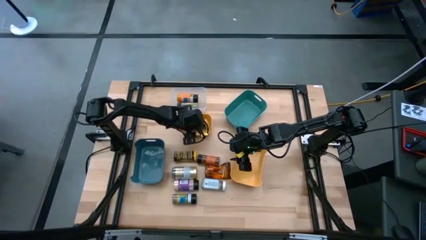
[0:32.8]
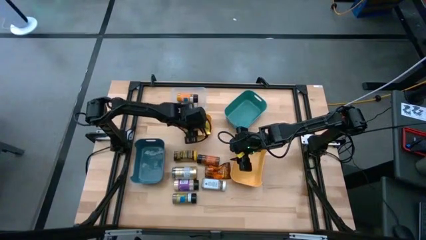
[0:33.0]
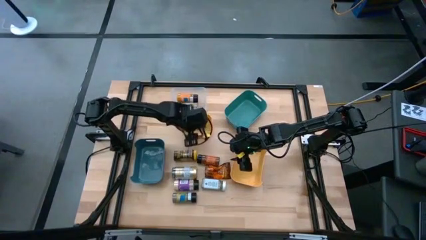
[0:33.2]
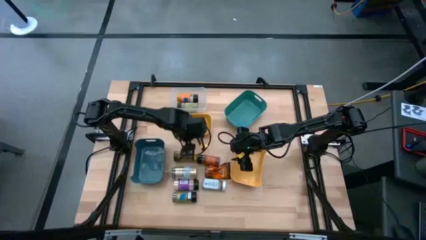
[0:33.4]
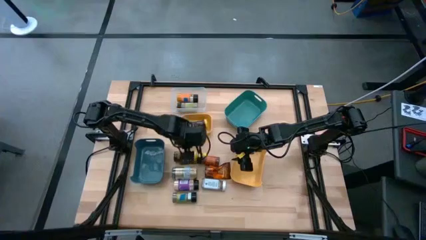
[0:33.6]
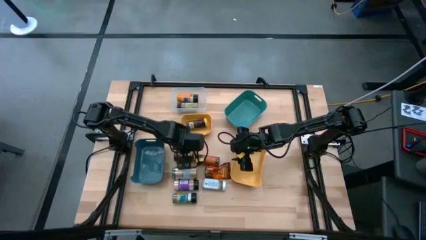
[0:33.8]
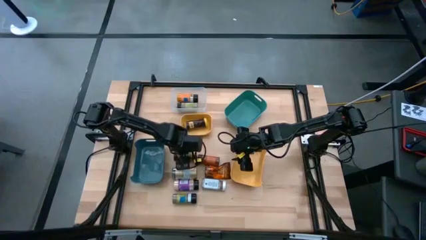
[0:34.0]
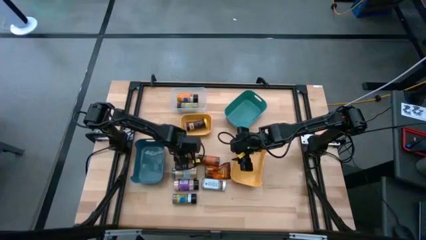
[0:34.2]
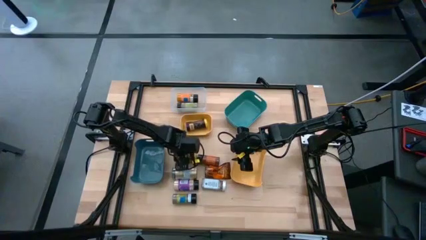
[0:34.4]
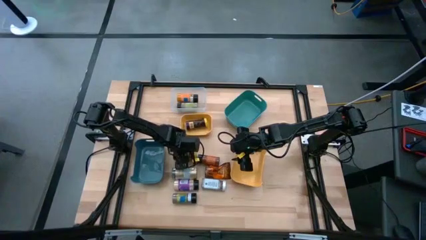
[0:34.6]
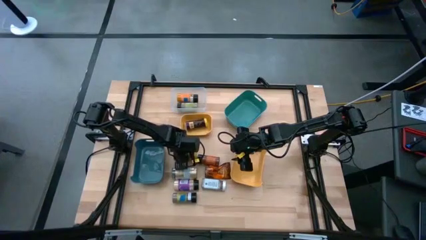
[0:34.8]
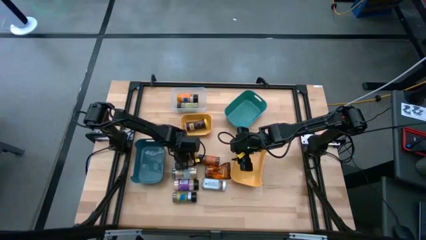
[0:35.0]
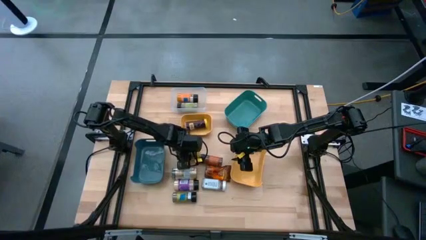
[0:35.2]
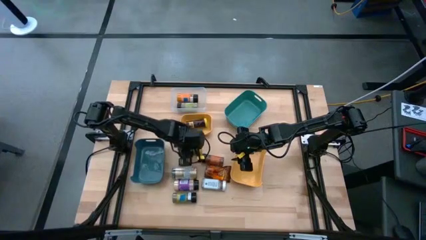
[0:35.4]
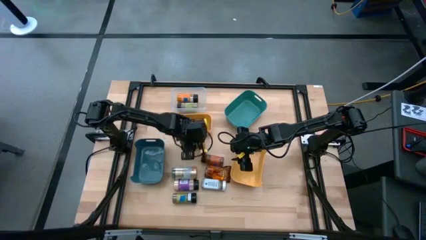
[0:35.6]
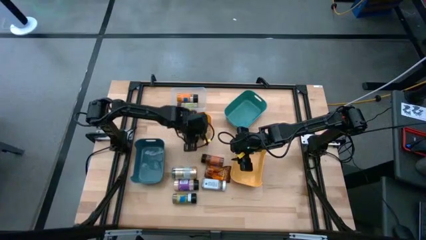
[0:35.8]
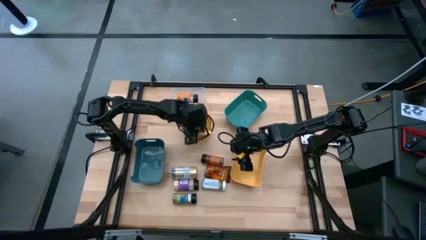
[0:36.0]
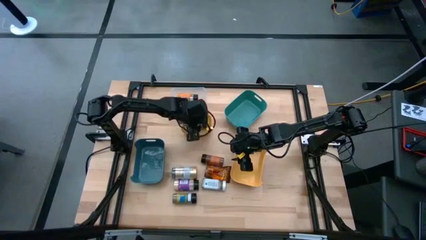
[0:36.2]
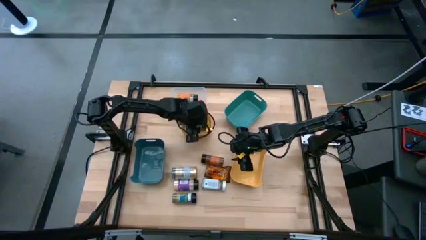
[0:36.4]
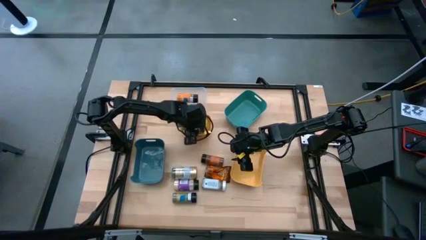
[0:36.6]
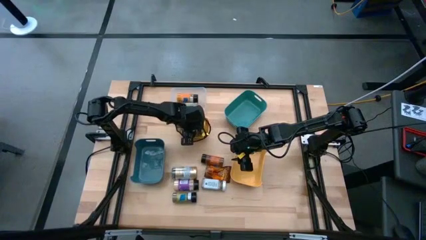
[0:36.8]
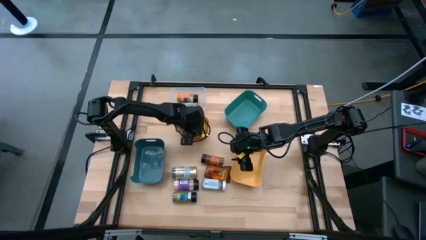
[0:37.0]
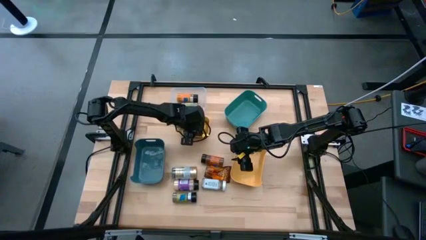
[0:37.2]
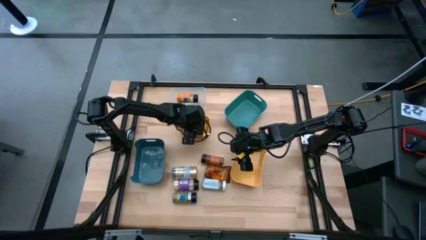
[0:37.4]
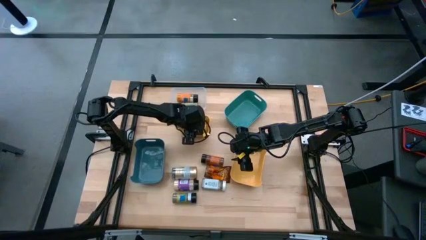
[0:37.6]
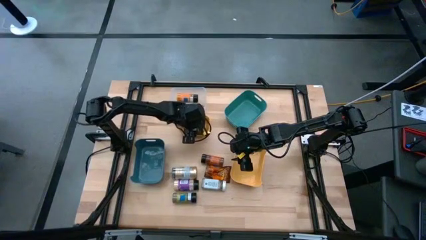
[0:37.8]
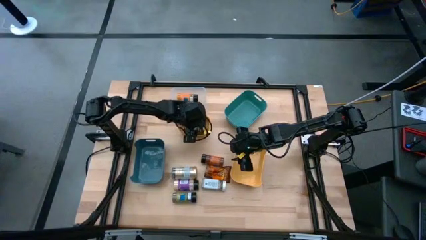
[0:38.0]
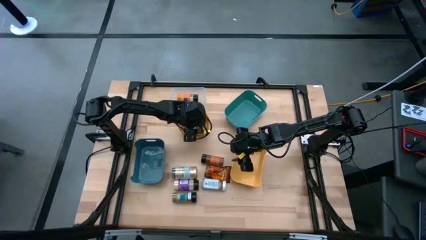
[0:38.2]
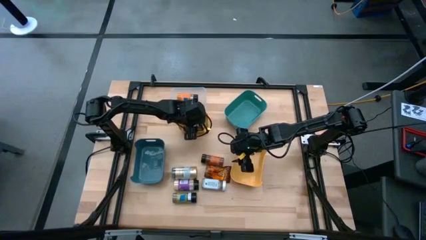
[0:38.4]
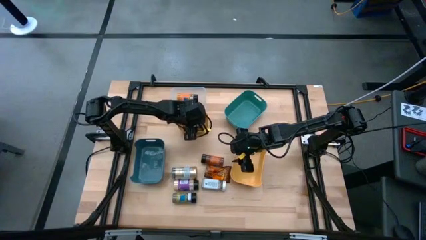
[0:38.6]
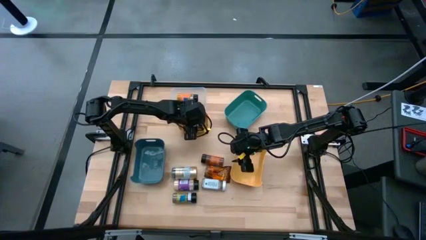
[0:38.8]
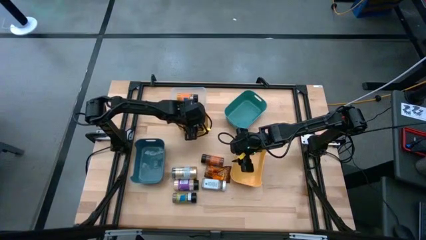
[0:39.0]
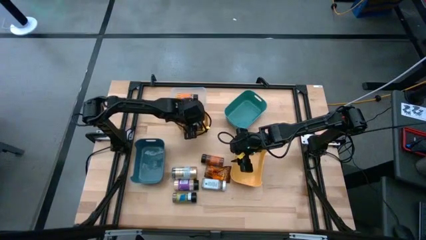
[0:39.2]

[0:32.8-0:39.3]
Task: Sort spices by type
Put the yellow seasoning can into the top yellow bin

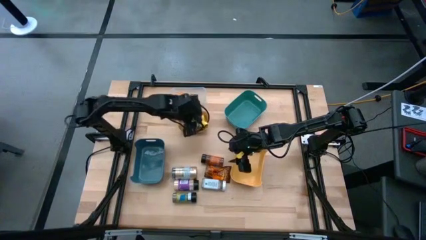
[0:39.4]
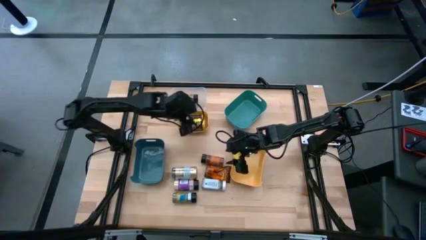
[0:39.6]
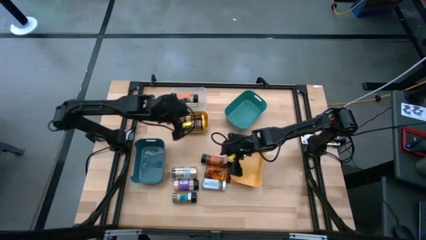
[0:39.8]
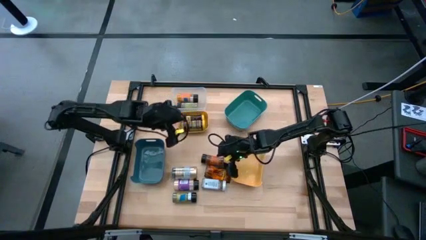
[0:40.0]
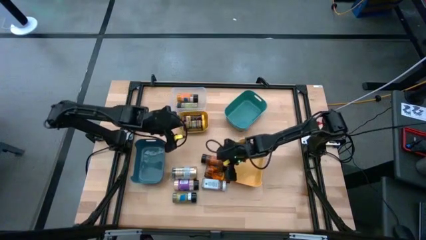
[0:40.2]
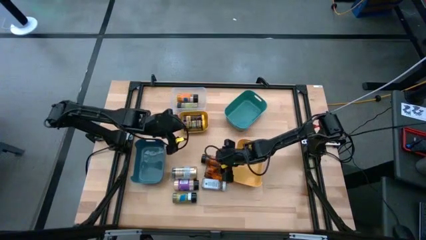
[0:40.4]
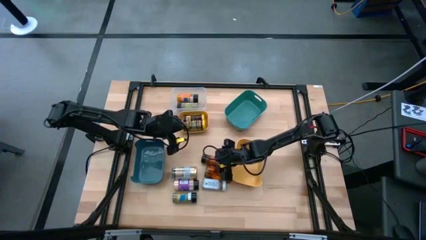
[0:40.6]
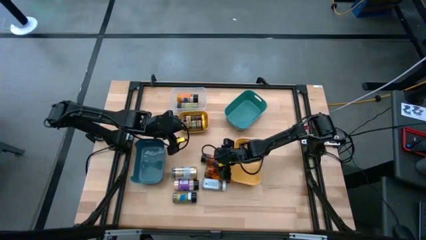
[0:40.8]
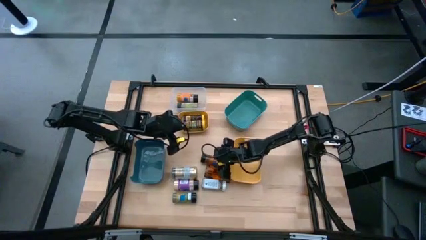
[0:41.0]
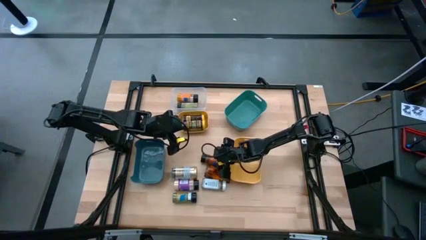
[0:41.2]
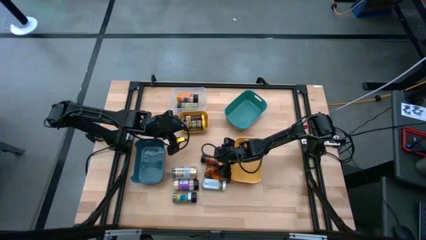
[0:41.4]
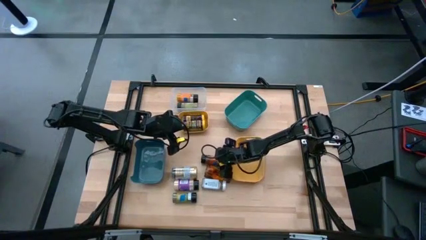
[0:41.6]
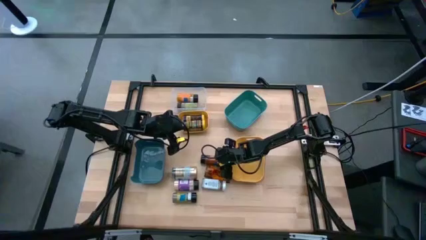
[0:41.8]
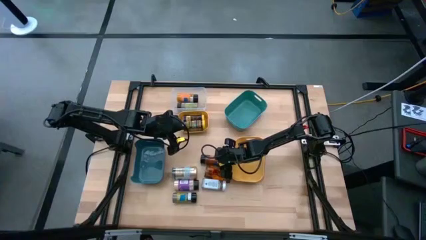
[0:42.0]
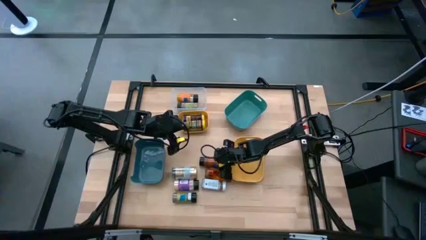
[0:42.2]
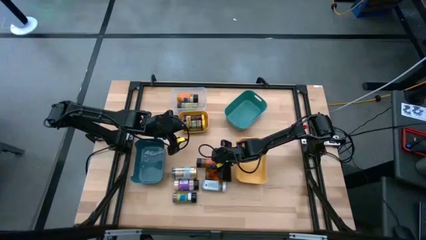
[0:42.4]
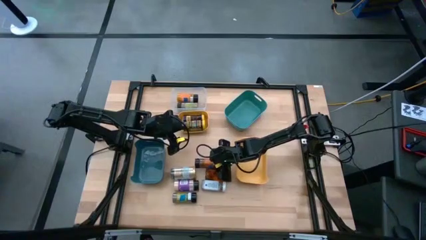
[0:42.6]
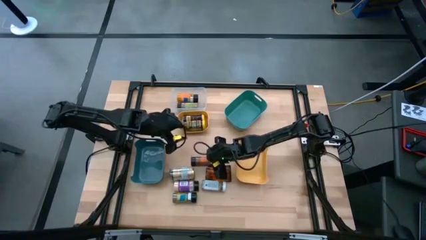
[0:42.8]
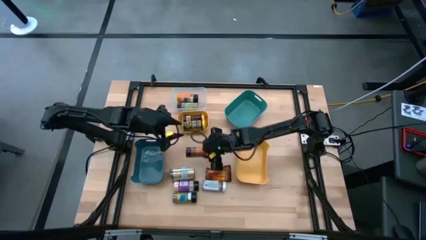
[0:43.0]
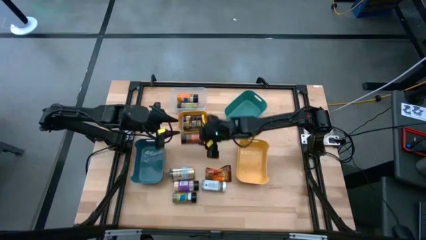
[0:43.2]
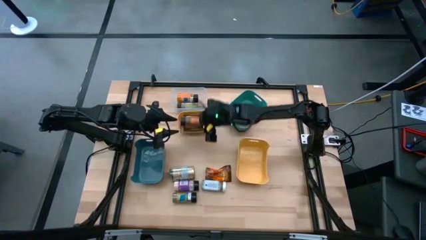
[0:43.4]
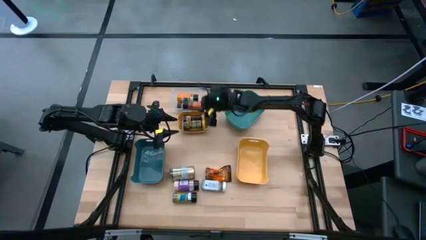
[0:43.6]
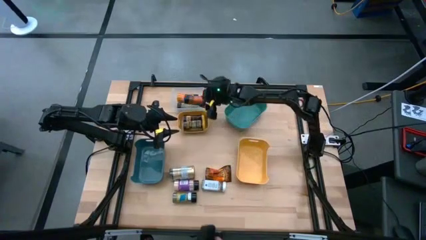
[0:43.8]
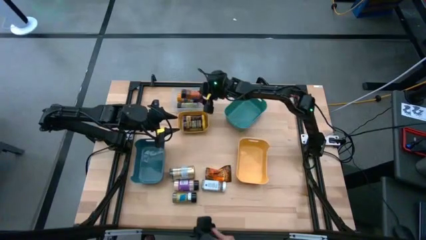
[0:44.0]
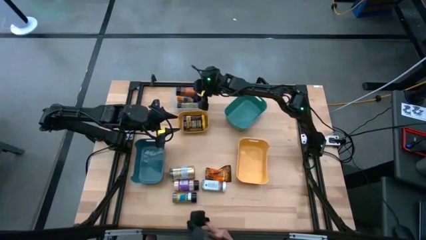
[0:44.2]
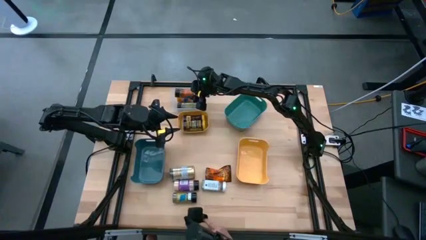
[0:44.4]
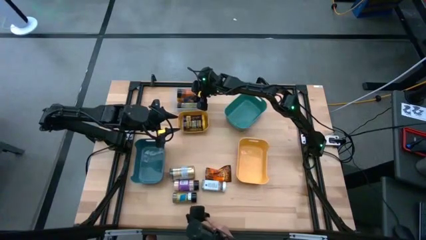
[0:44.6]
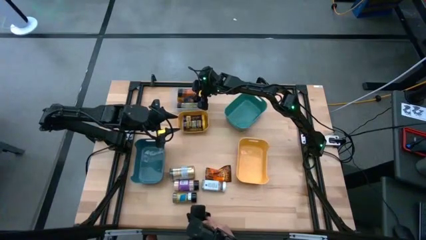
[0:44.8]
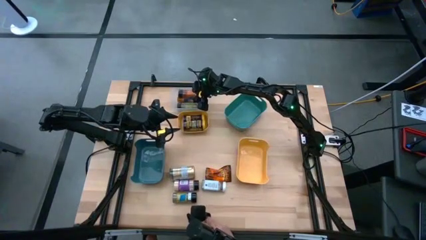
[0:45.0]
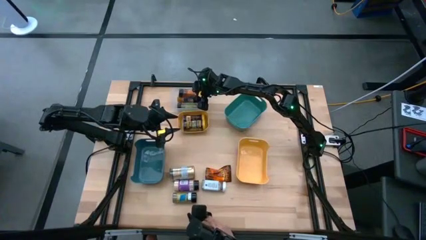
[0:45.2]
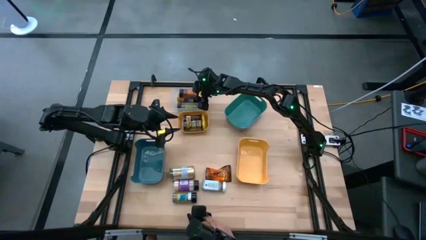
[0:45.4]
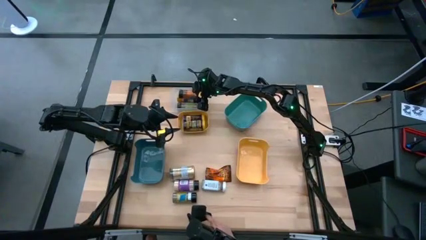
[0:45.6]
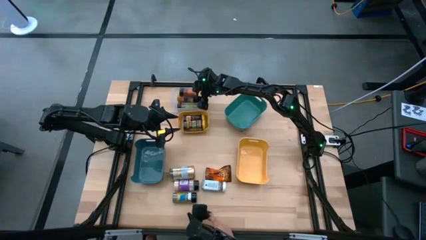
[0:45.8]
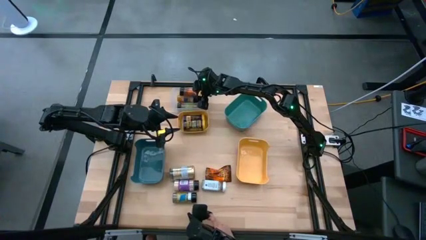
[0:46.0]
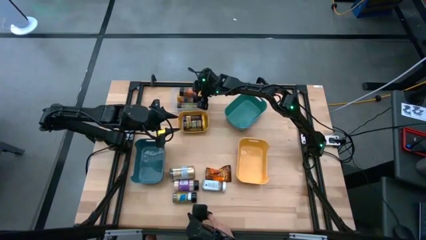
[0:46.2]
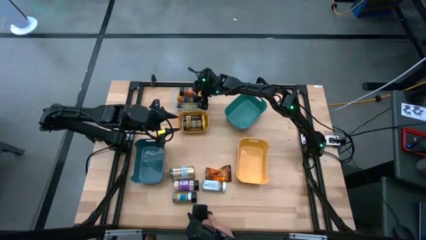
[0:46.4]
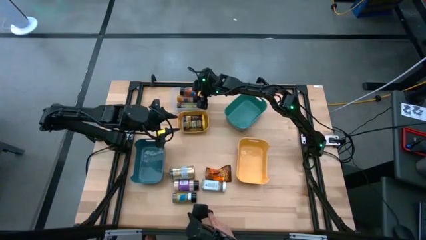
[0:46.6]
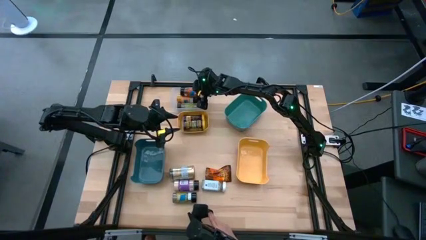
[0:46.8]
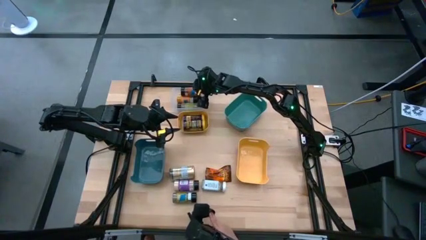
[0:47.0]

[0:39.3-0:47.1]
Put the black seasoning bottle into the transparent bin

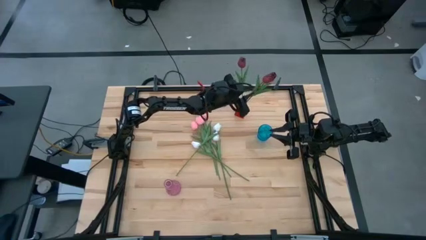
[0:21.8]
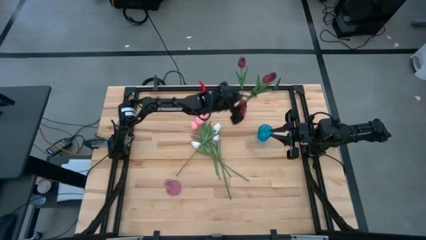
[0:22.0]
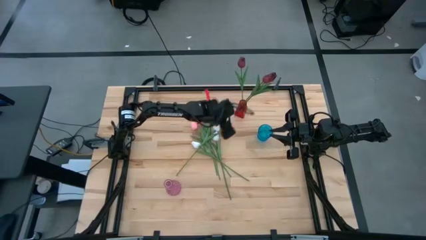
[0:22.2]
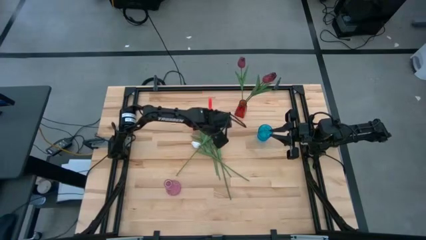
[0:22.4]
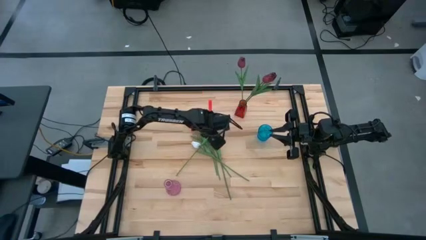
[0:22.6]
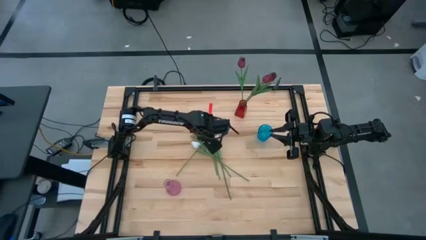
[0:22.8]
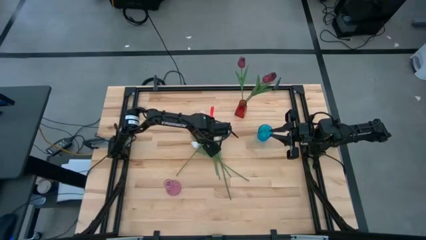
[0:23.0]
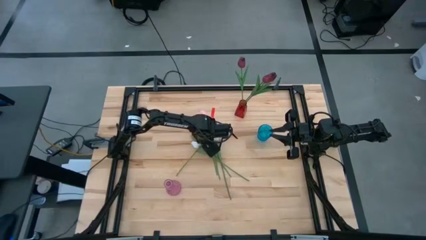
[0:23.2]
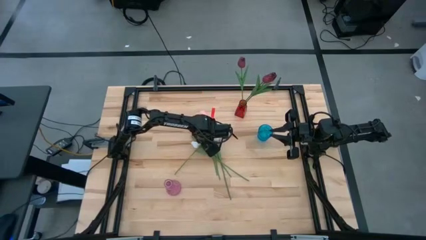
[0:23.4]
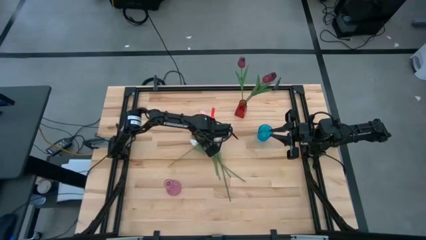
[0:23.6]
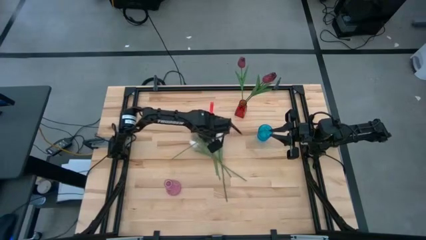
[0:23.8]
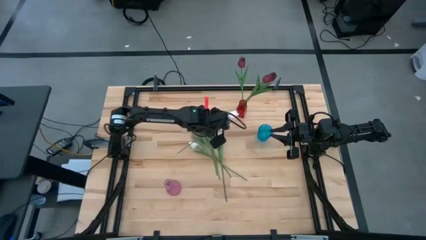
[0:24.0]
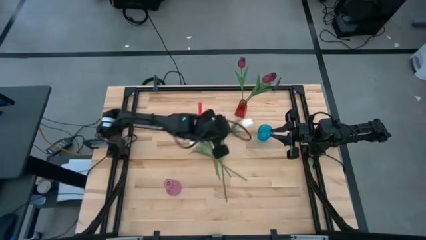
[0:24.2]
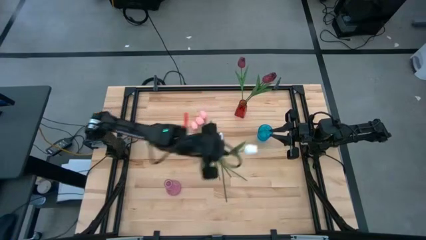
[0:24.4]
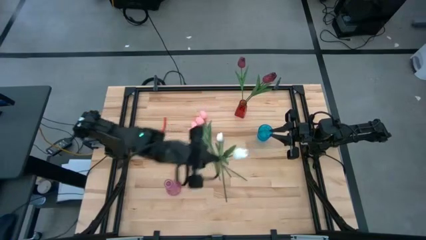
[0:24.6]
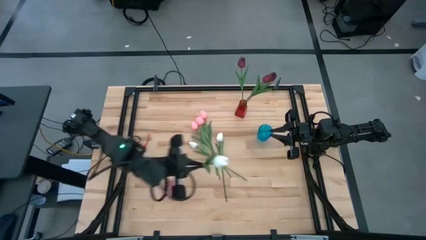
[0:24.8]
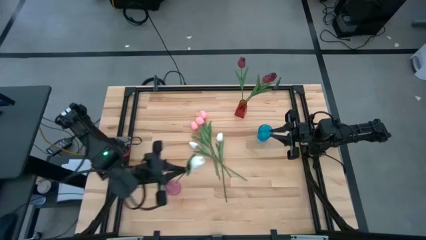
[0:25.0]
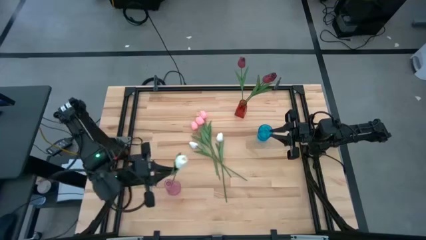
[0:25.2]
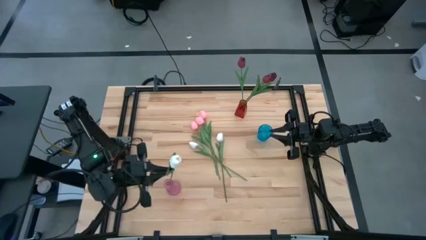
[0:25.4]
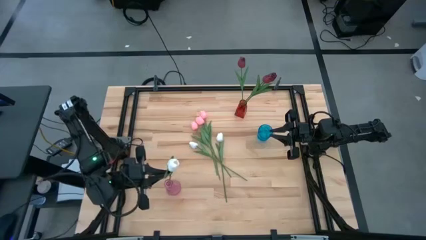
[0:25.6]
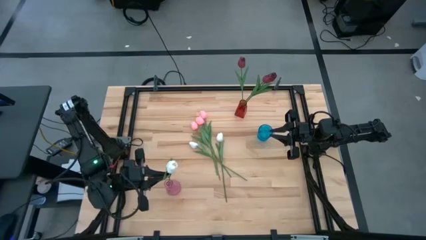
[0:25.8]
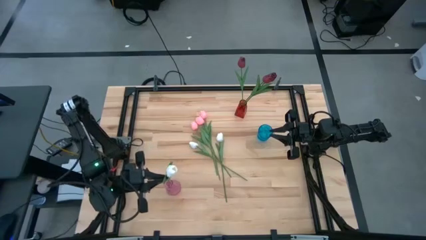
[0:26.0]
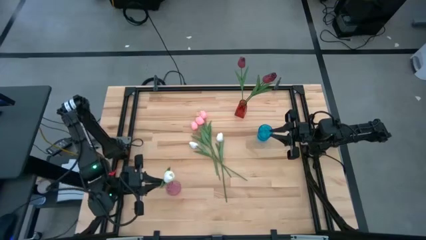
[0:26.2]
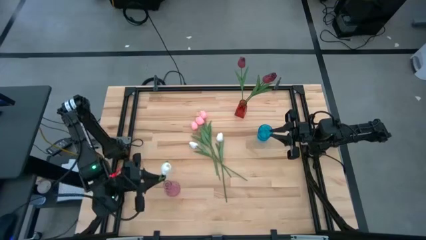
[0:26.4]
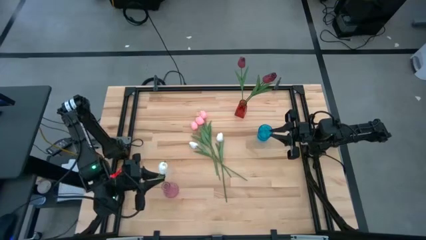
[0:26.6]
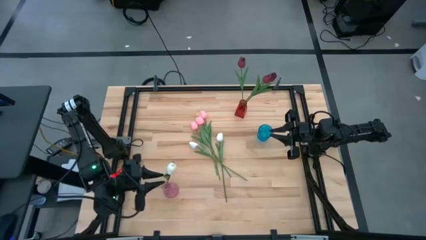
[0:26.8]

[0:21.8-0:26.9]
Task: Sort flowers into vase by color
Put the top white tulip into the pink vase
